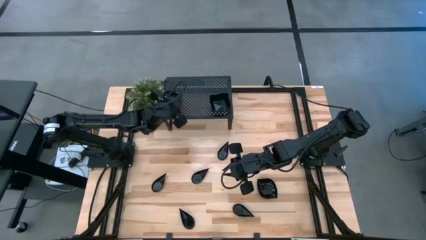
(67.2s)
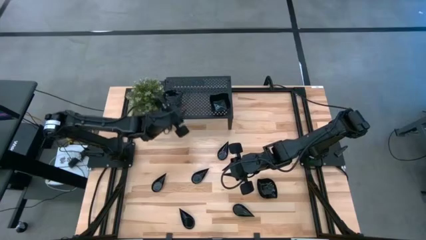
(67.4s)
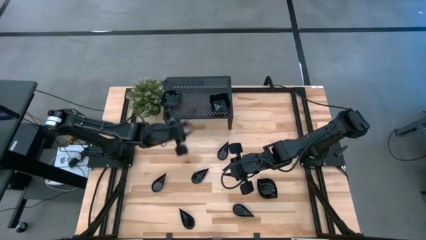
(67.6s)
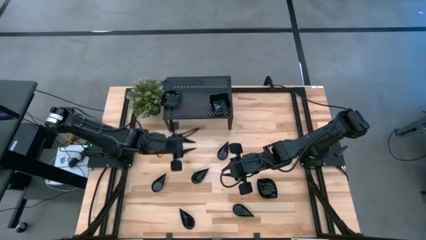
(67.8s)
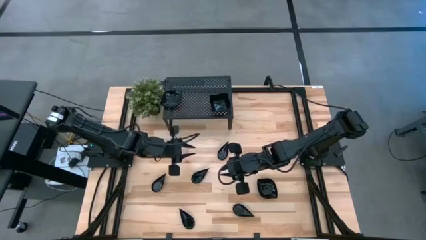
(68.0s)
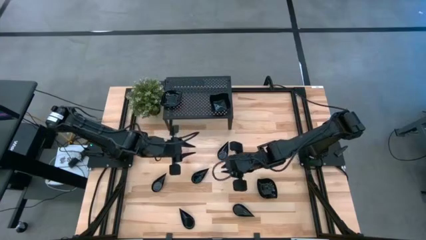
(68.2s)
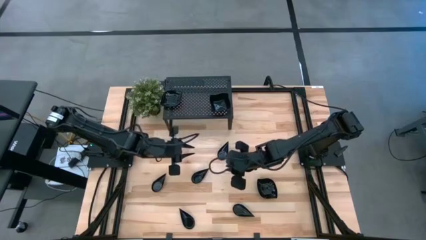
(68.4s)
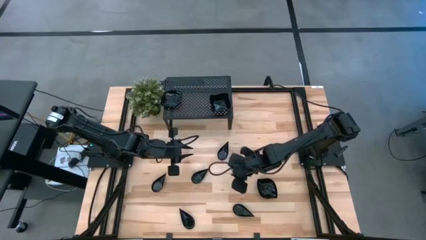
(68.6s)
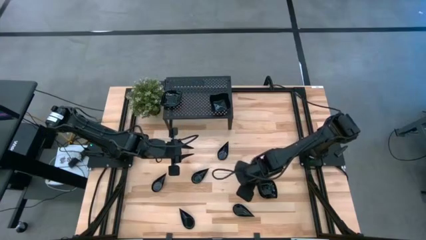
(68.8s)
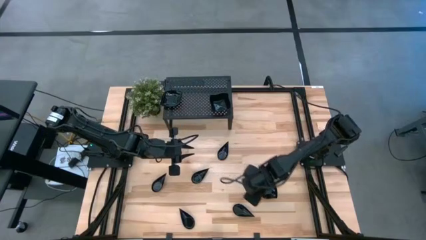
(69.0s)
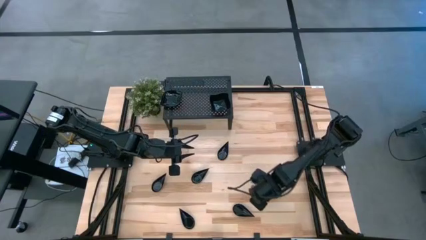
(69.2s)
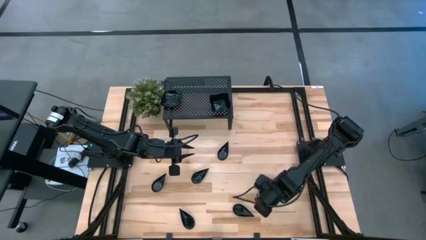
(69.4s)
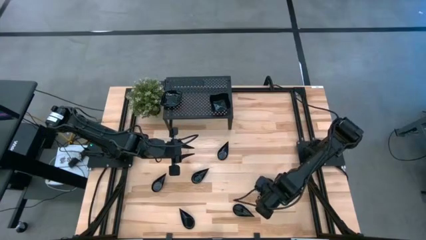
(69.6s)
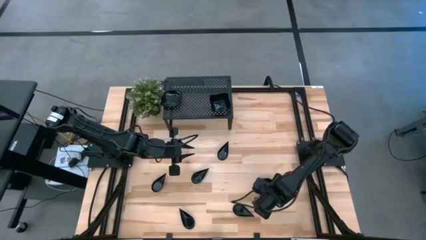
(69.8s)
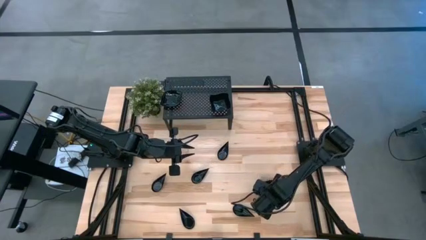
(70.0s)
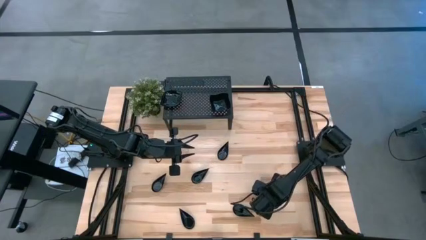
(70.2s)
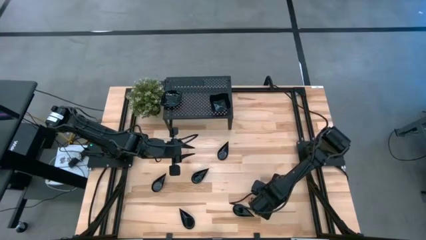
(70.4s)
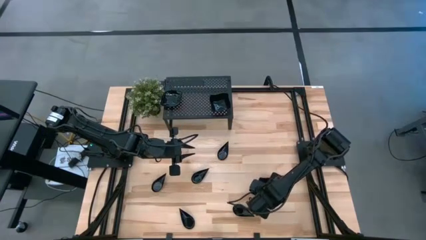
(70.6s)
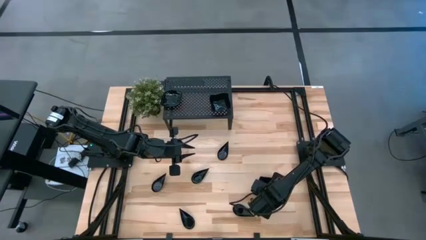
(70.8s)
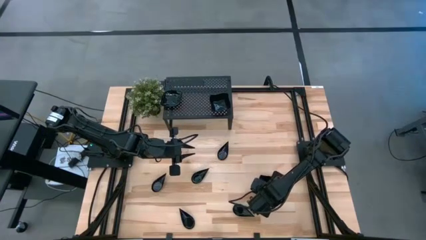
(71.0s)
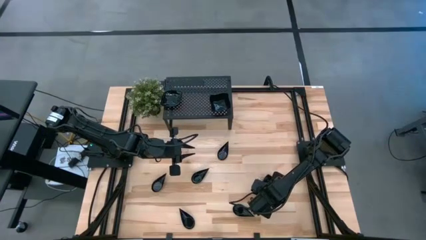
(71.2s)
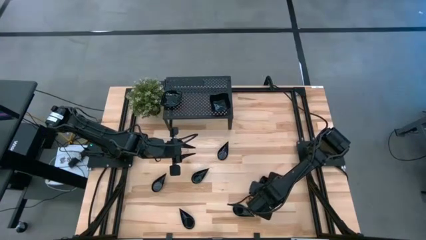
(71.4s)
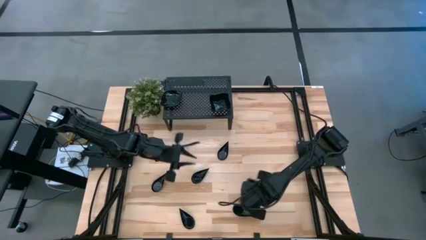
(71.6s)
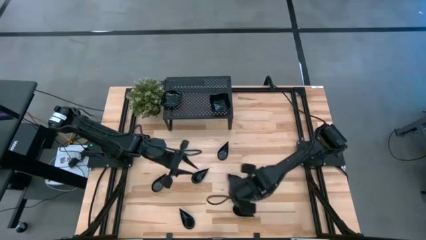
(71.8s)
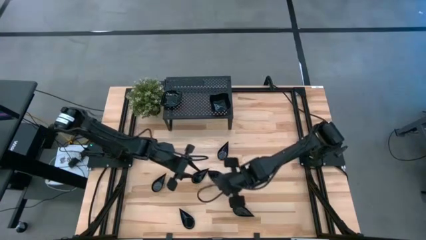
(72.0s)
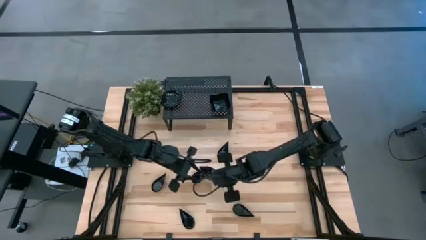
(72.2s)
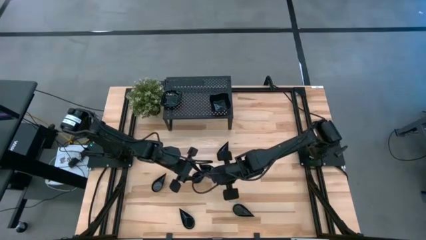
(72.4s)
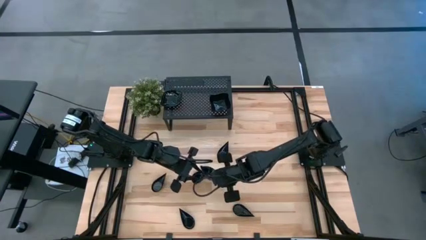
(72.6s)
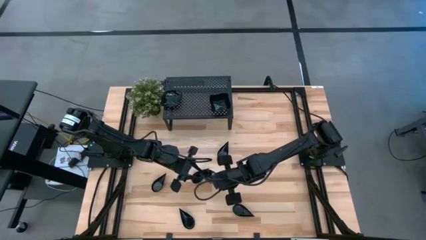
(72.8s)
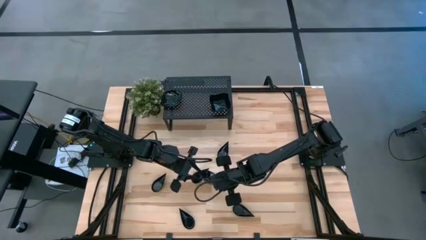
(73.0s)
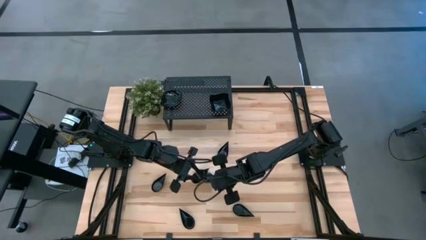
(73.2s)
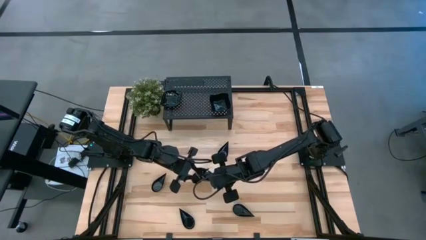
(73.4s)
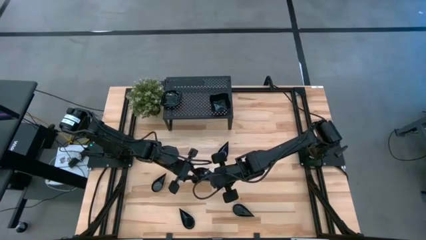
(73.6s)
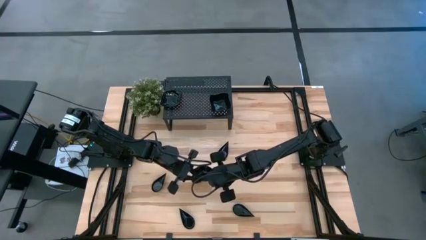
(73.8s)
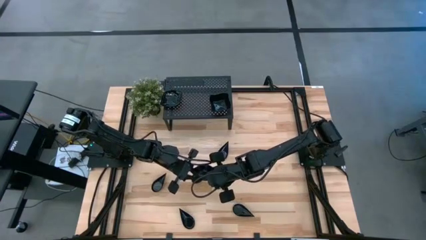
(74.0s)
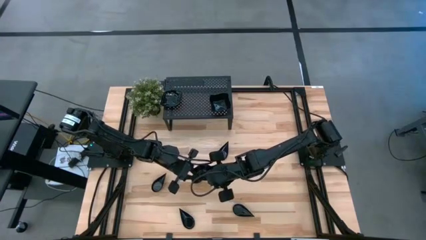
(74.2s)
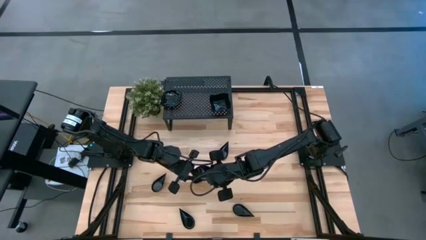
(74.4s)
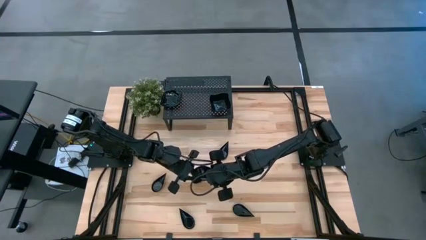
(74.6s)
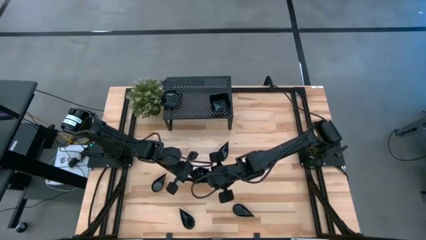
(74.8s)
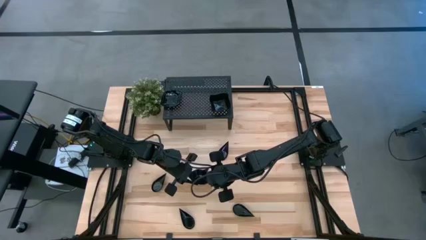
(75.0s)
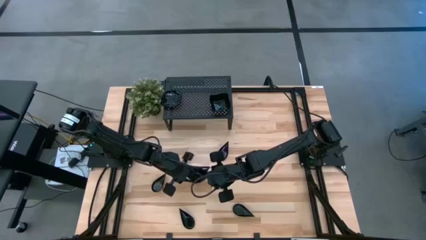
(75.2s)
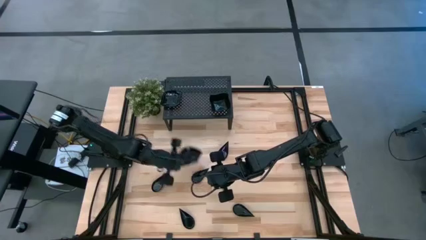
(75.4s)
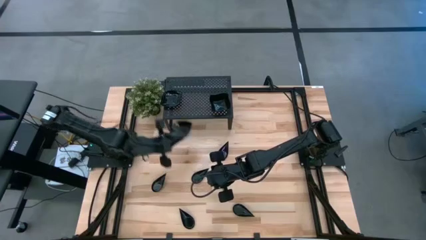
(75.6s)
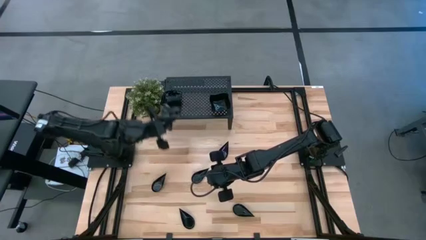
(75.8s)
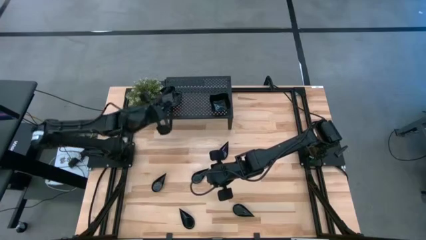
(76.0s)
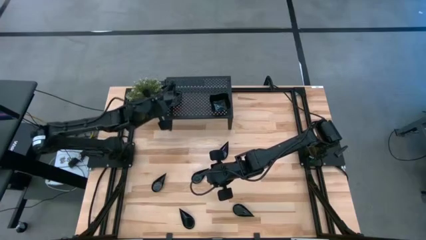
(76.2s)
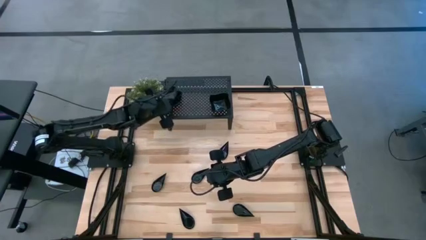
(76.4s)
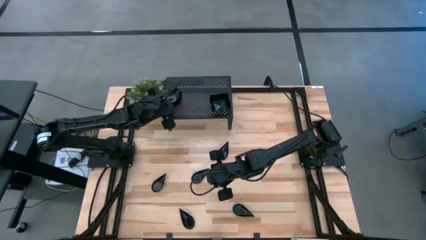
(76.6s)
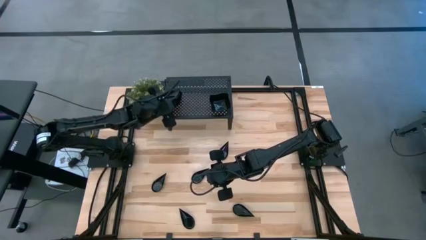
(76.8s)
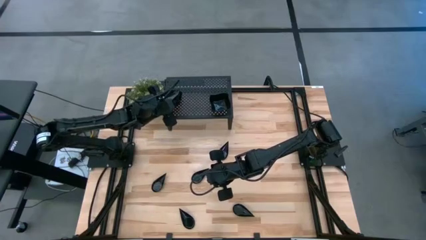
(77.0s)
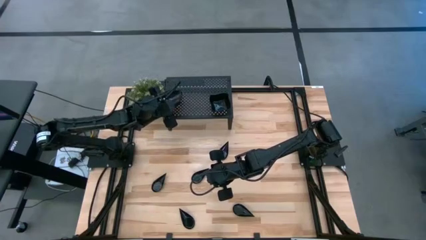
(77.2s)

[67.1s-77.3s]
Task: Pick & Place Mini shaped plates
Stack the black leaf-shaped plate on top of the black leaf-shaped plate on the shelf

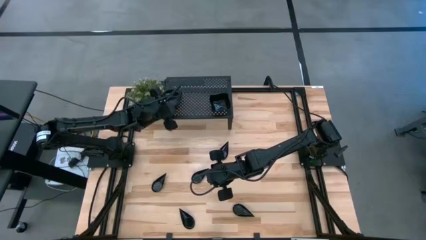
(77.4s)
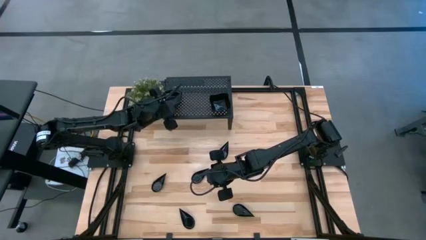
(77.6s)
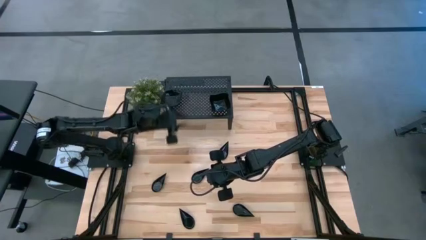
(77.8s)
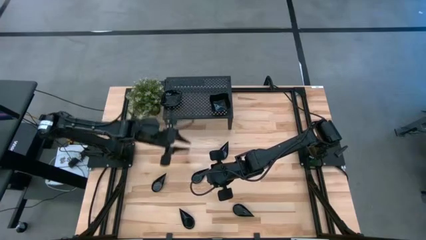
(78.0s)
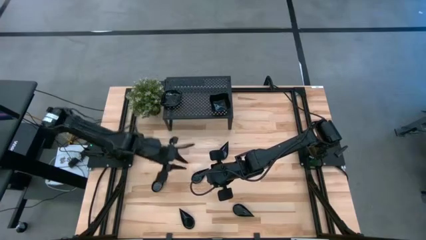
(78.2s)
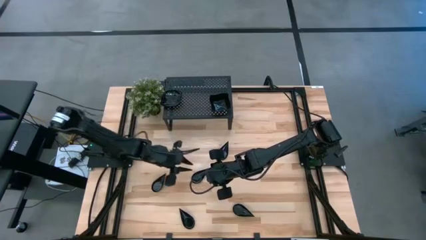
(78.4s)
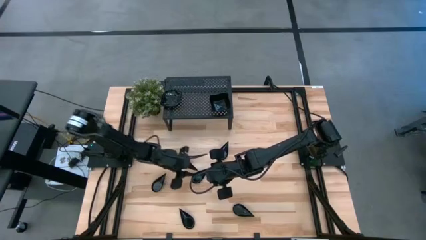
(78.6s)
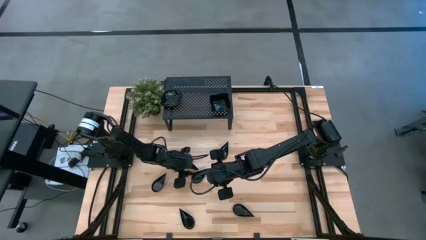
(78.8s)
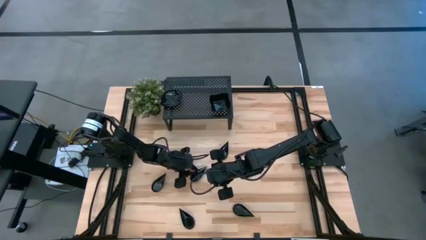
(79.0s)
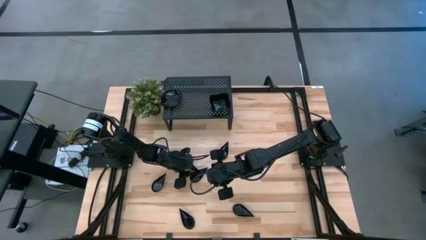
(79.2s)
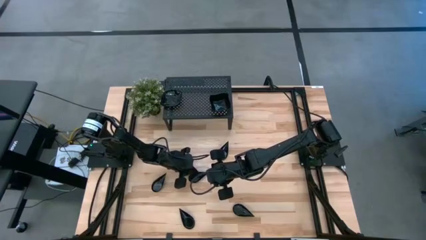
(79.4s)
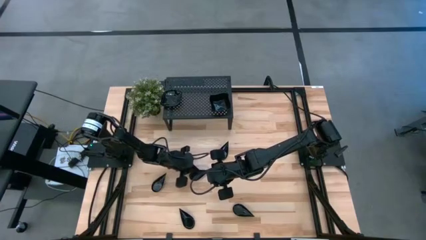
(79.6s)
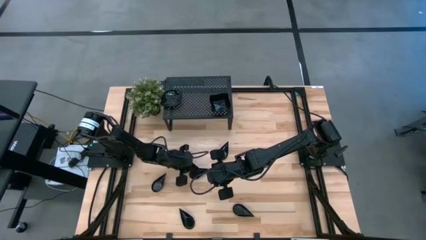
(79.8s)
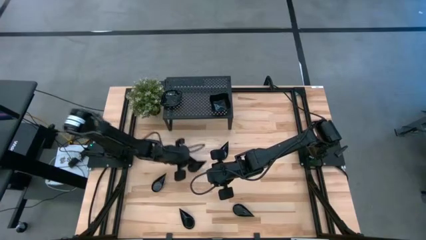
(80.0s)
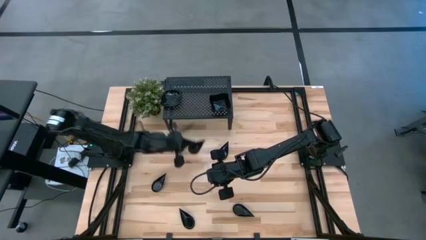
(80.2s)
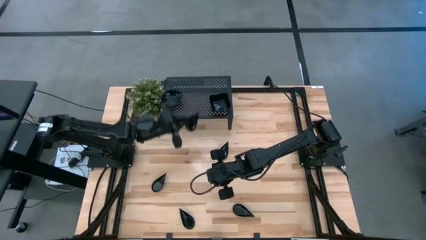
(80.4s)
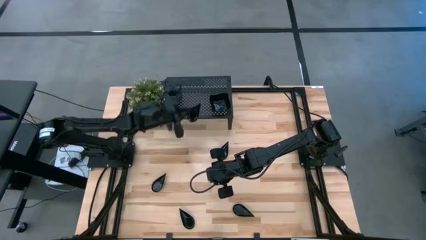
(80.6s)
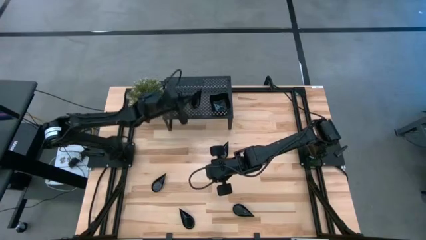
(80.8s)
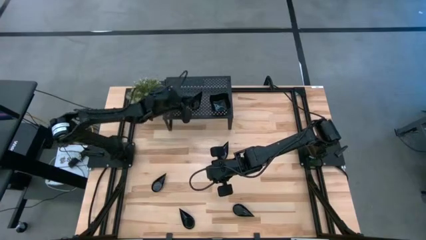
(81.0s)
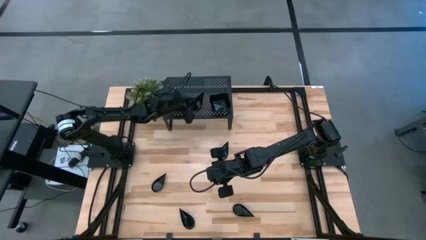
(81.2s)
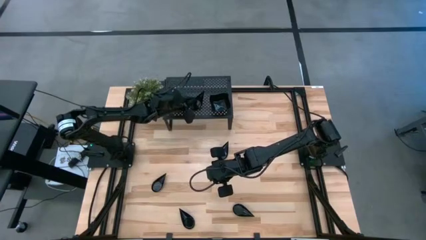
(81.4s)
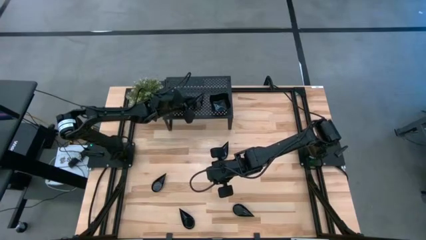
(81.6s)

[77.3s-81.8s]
Put the black drop-shaped plate on the shelf
